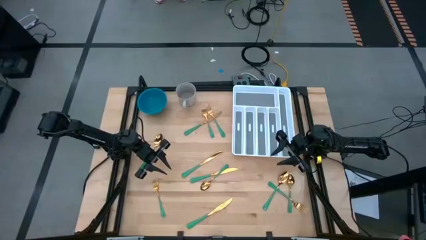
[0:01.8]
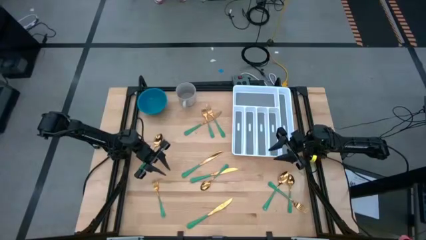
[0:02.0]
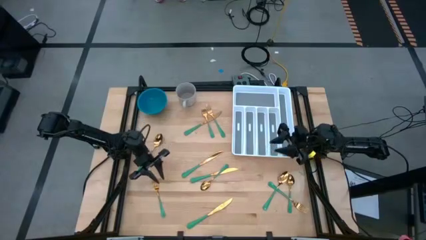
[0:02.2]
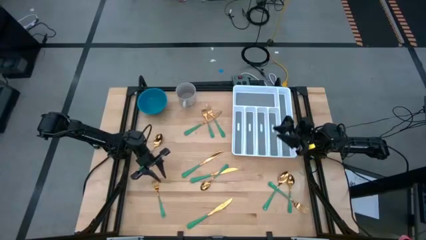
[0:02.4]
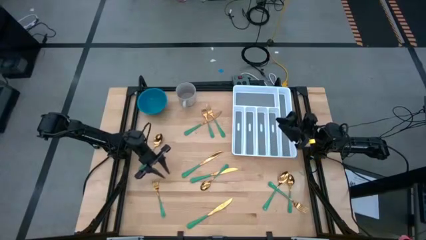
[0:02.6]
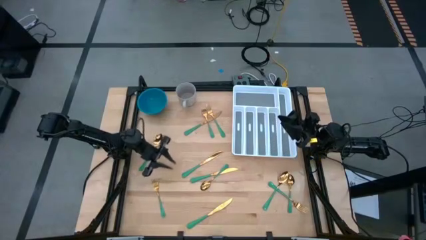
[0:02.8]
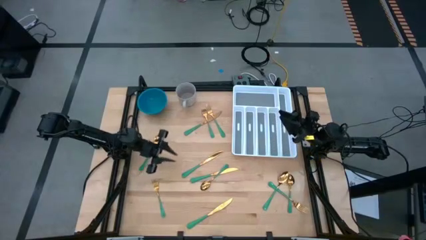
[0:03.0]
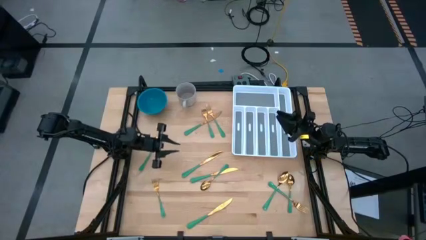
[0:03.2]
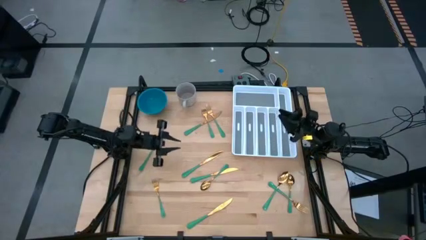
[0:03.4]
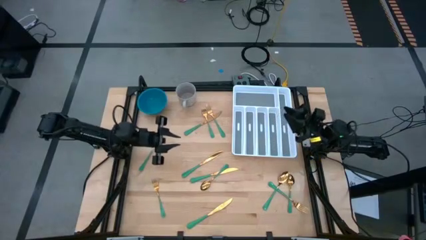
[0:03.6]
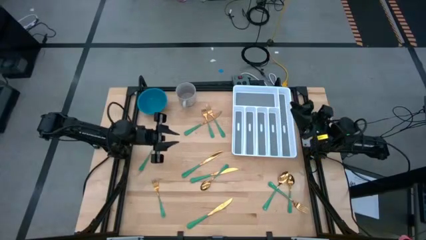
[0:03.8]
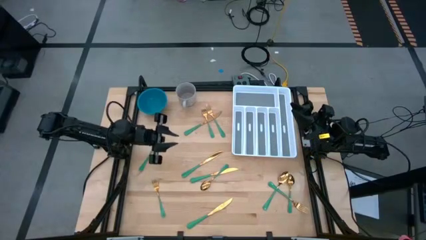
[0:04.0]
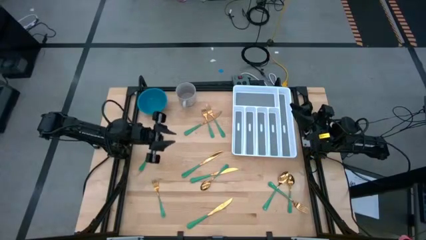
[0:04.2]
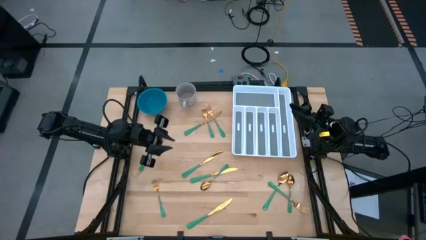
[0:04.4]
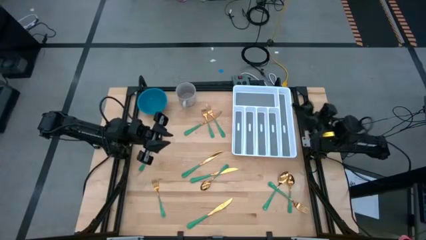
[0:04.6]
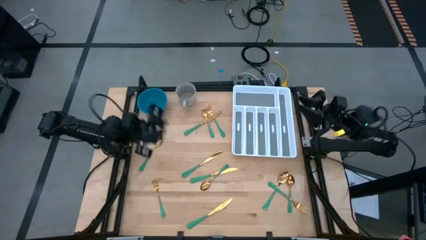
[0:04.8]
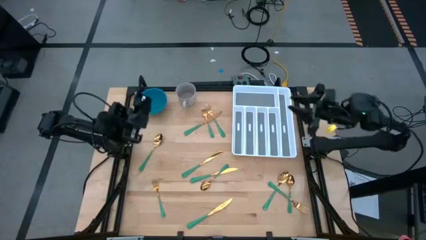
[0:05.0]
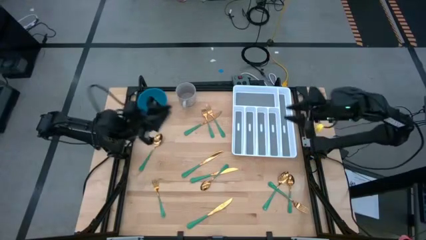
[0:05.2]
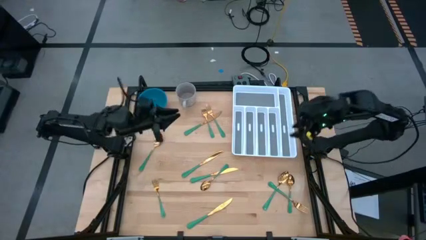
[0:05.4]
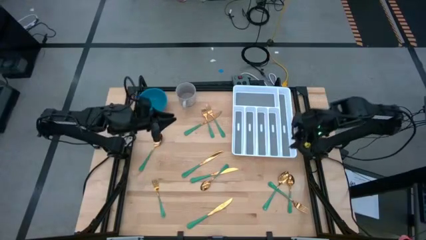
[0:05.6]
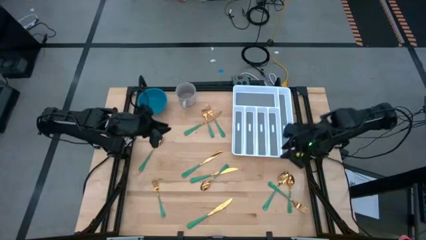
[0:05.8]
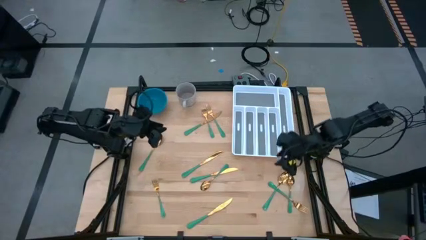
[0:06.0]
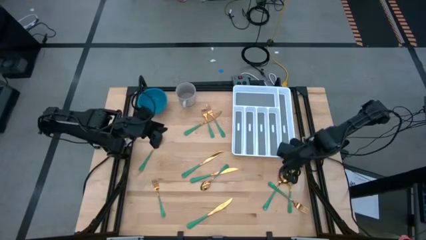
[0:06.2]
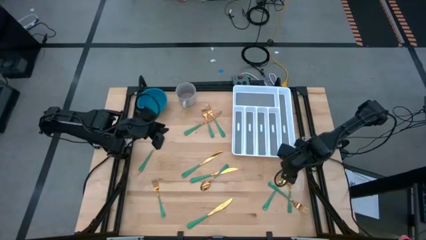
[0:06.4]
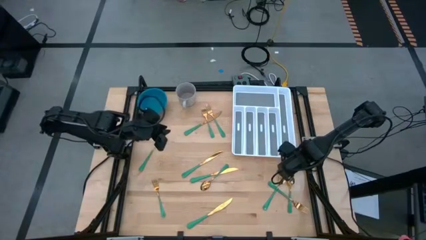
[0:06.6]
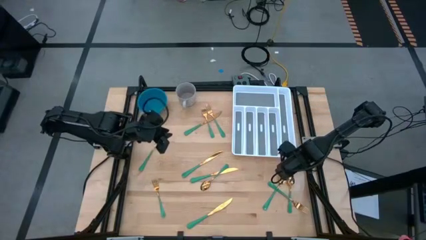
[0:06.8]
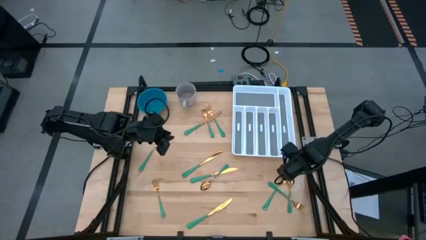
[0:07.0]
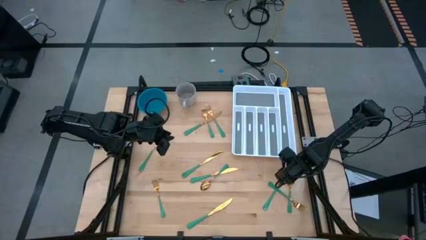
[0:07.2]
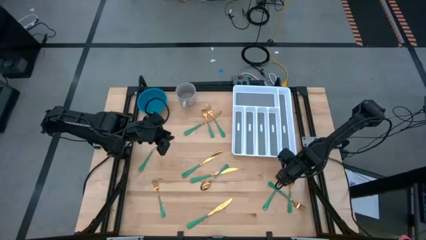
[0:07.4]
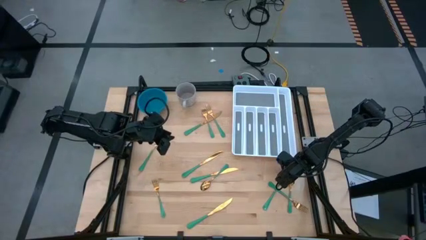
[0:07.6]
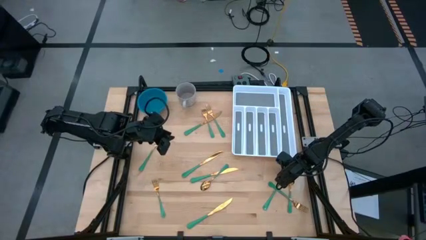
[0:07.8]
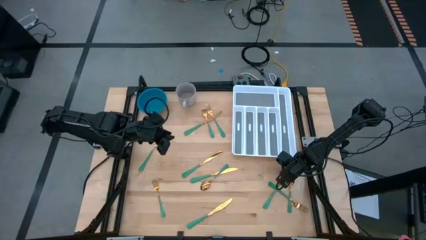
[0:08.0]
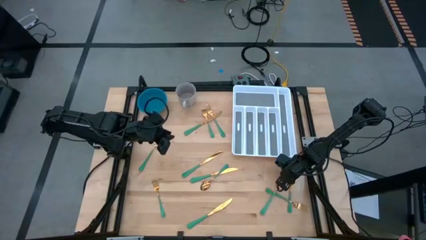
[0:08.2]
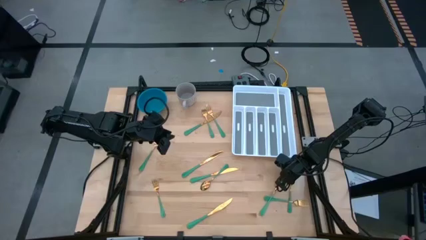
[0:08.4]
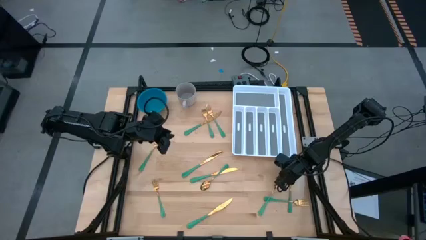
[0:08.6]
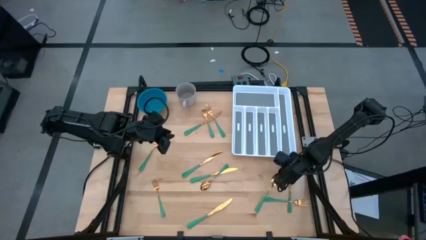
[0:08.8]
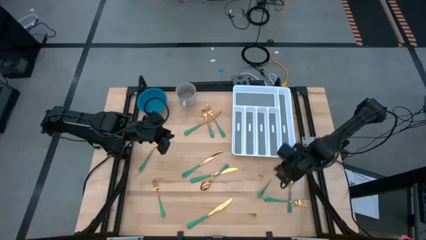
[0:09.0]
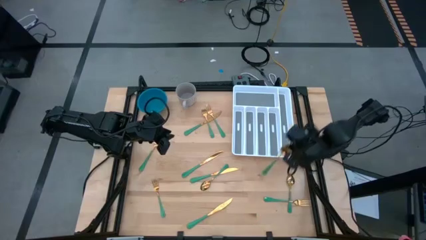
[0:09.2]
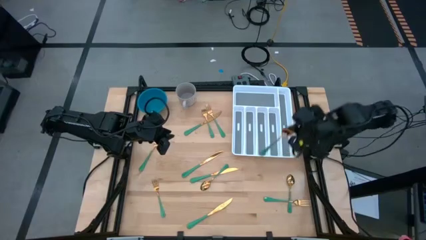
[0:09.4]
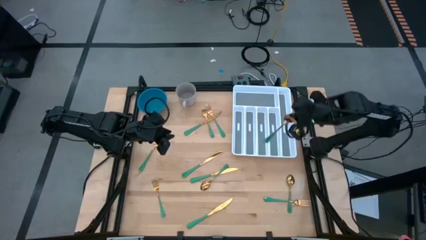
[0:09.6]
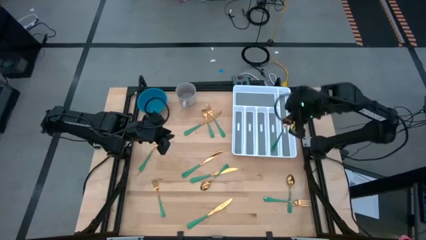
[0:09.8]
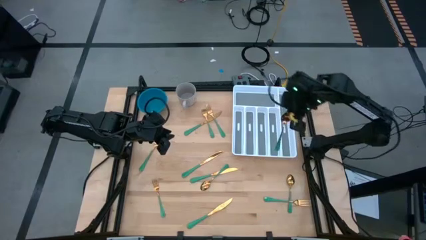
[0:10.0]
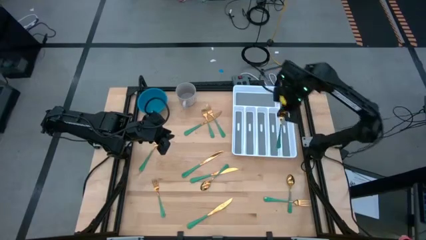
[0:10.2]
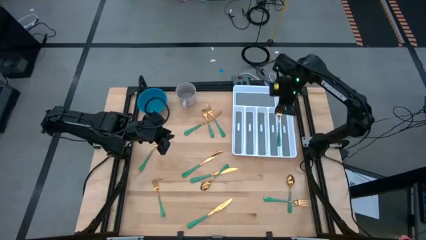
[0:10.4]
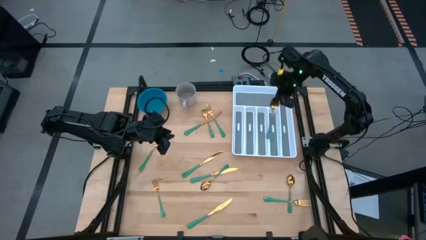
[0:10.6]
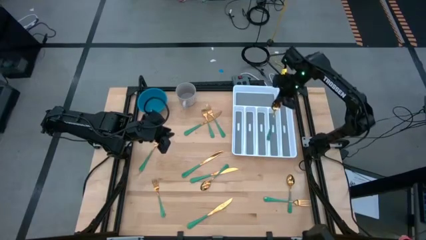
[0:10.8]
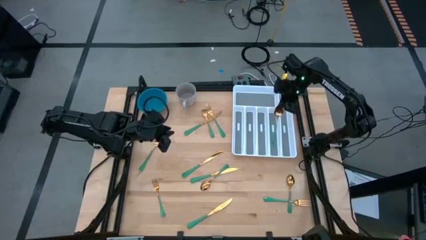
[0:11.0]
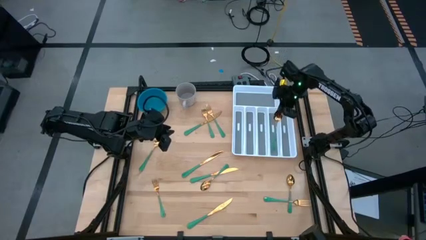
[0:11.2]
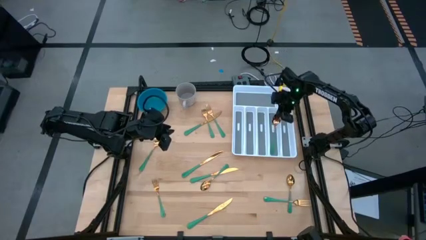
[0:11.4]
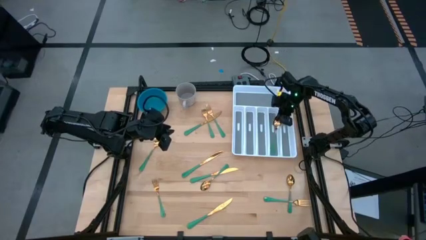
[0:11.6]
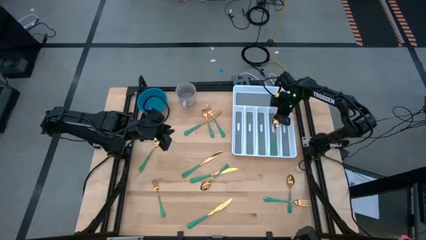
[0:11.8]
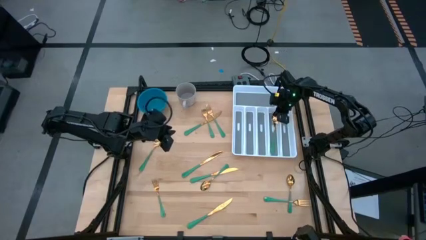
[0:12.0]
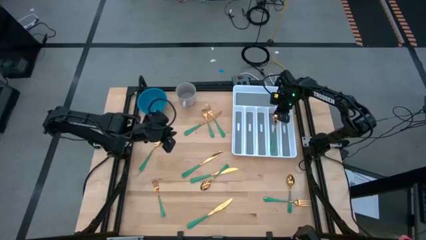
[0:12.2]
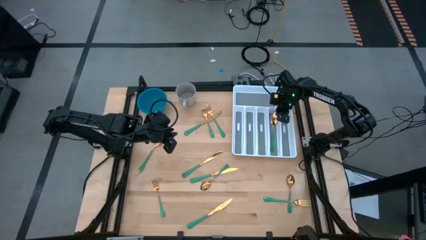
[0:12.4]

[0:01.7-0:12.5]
Task: Sort silverware
Put the green spoon into the white cutlery tray

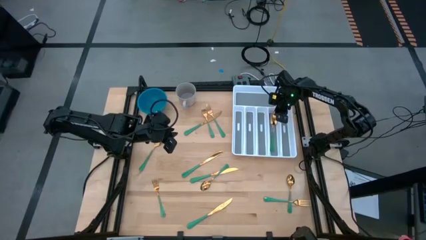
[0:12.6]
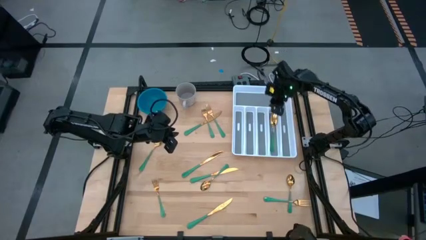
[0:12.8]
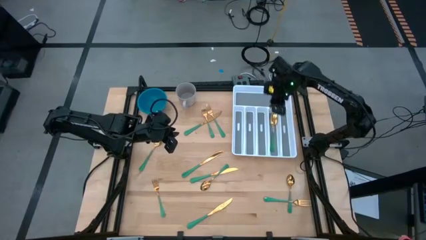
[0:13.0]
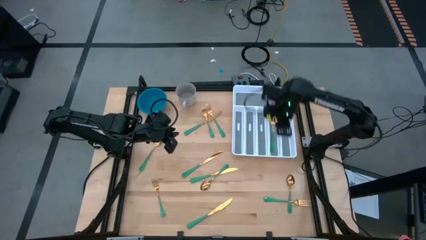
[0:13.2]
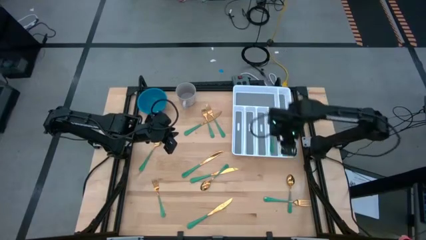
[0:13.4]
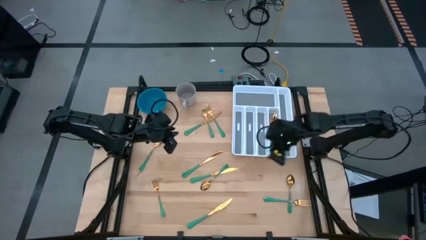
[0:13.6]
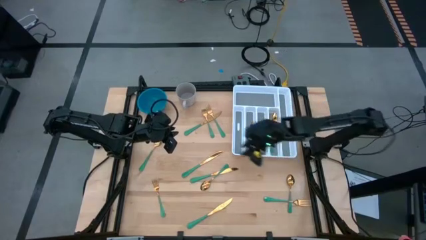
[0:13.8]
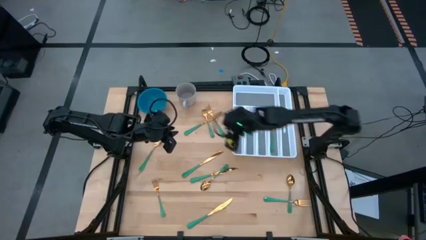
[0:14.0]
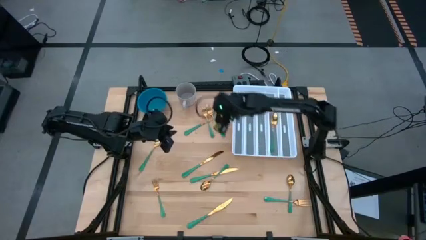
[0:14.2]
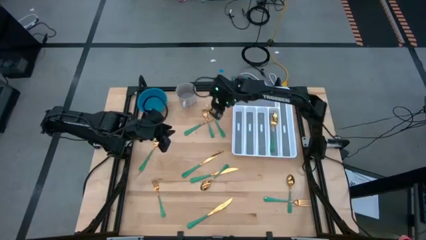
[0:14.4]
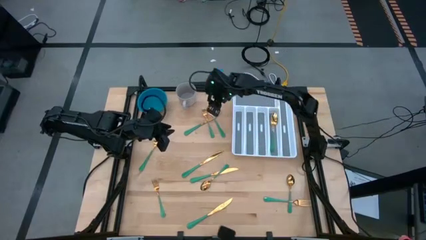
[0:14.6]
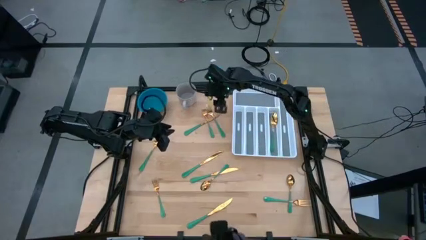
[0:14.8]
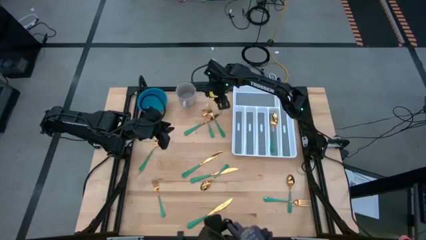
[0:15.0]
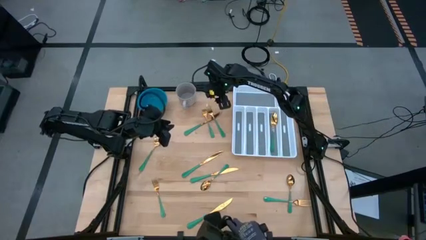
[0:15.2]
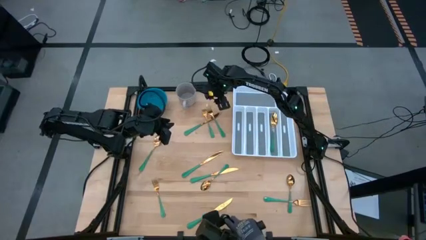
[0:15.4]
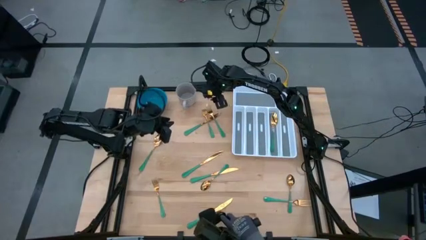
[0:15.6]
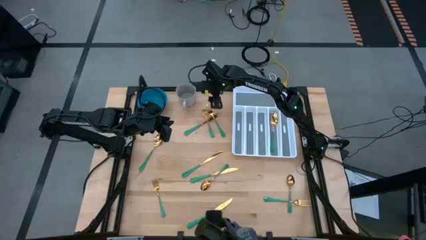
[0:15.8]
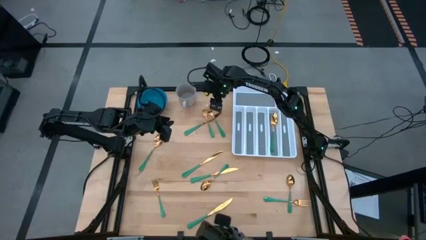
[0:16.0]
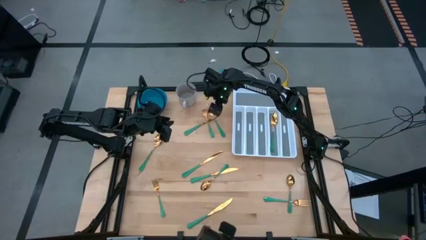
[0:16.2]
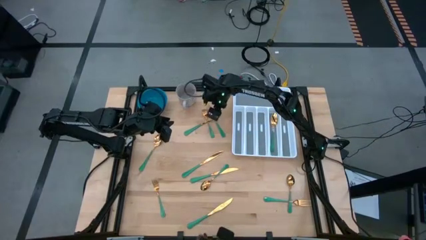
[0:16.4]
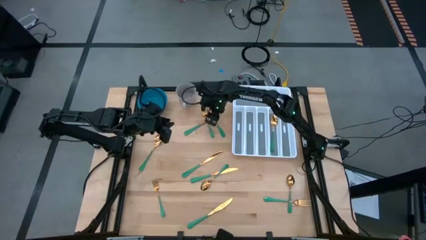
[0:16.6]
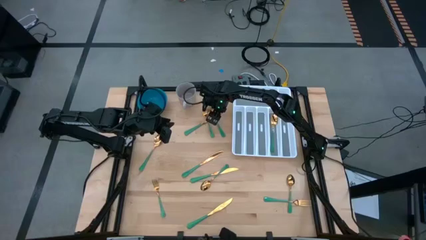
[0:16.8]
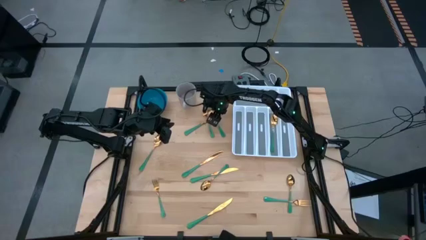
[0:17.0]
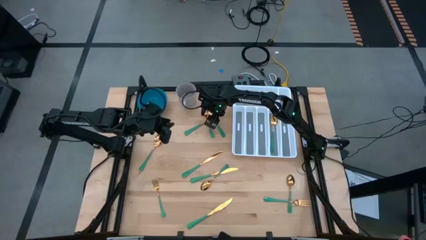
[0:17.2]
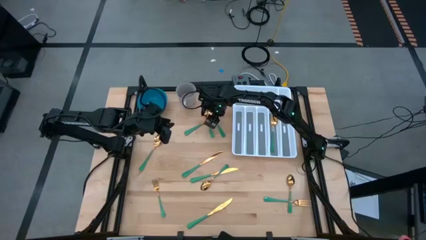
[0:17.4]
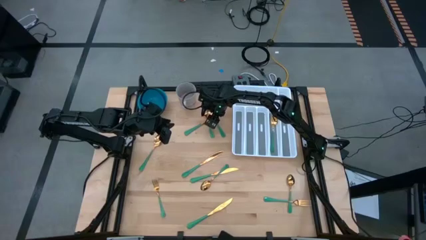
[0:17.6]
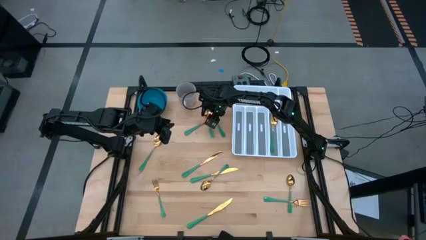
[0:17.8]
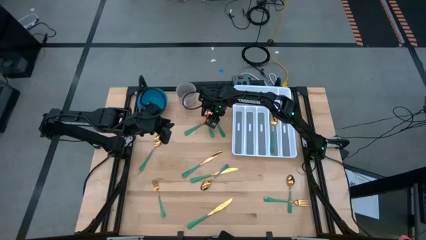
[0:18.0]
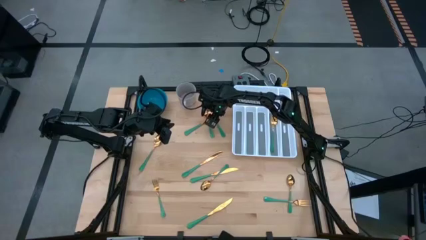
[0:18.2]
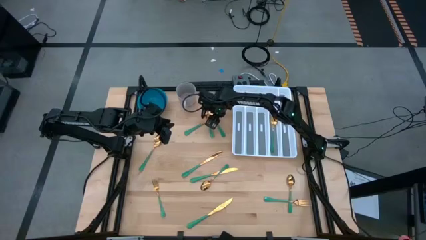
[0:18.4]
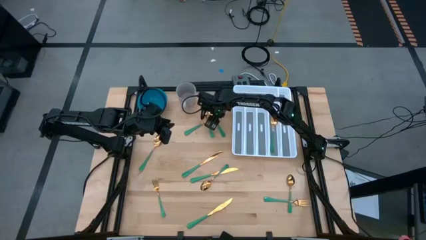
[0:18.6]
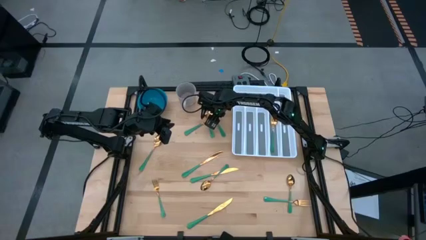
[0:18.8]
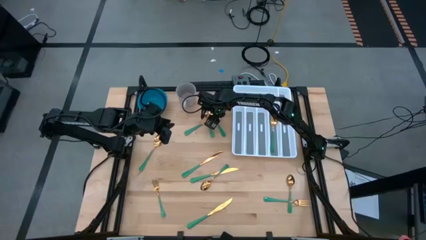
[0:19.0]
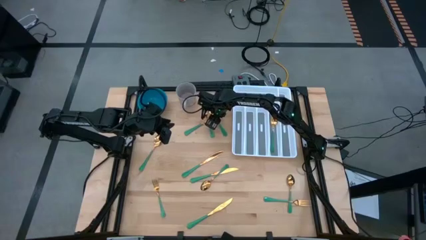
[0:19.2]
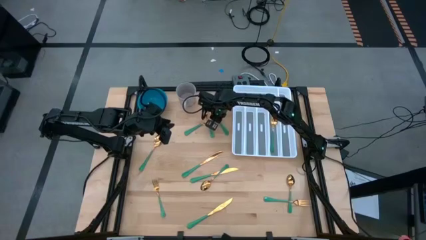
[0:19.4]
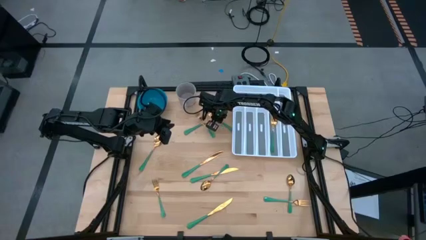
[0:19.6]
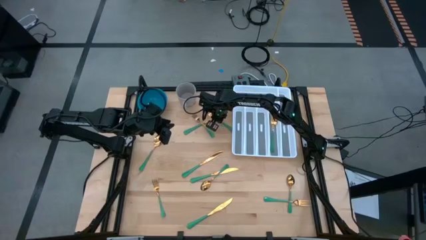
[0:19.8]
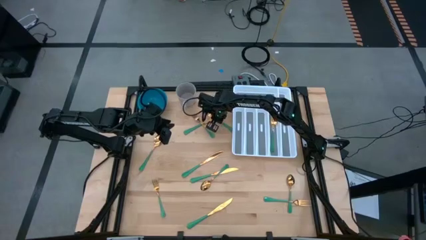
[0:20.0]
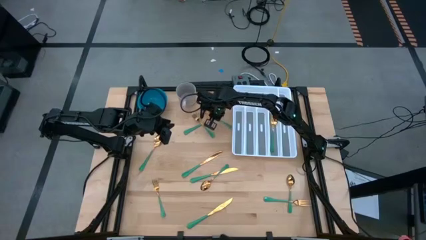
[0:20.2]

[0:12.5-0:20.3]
Put the green fork into the white cutlery tray
